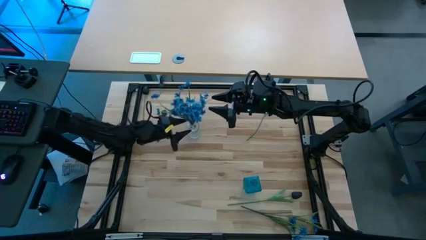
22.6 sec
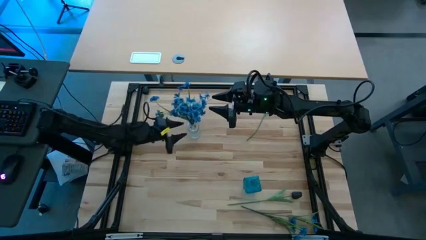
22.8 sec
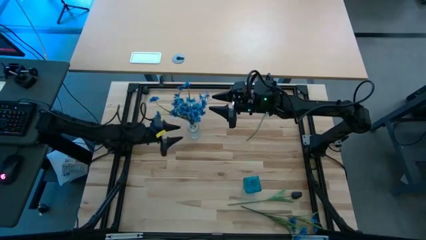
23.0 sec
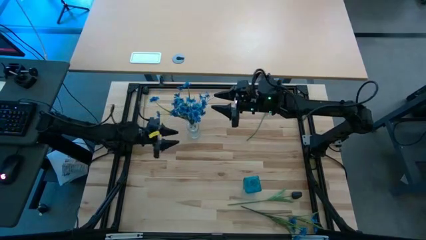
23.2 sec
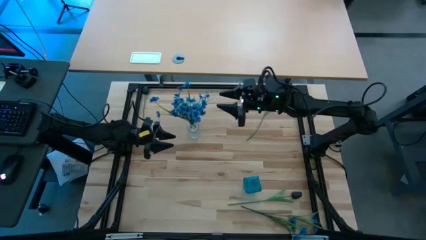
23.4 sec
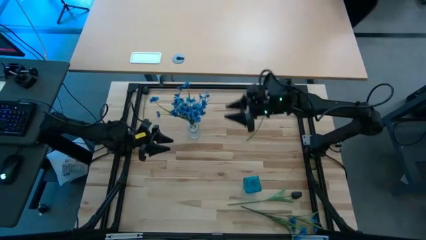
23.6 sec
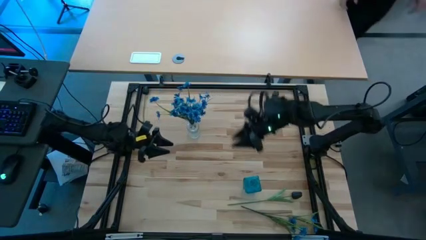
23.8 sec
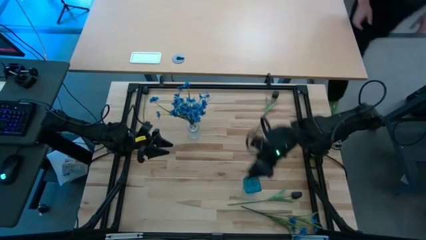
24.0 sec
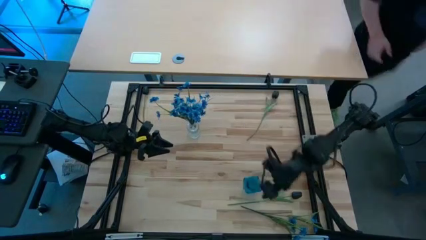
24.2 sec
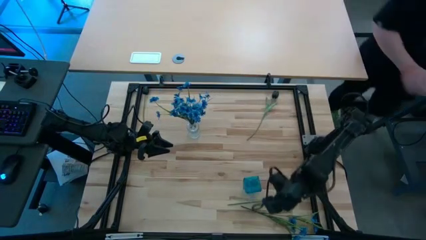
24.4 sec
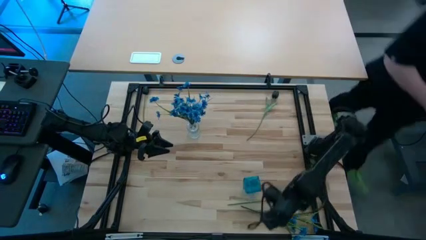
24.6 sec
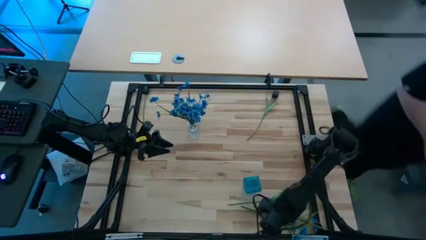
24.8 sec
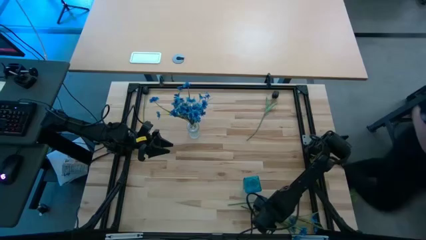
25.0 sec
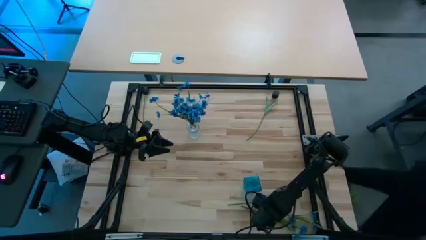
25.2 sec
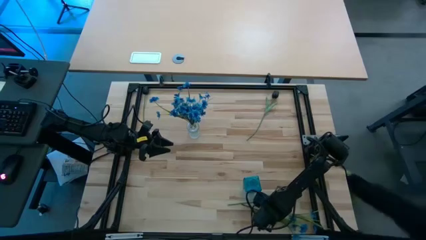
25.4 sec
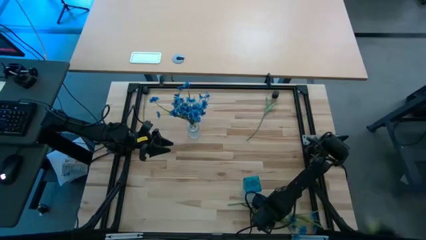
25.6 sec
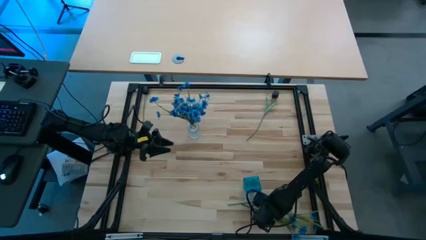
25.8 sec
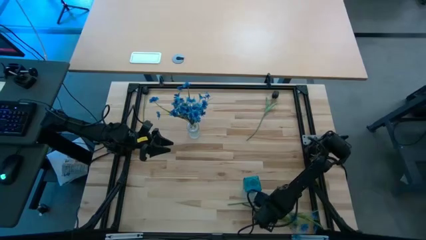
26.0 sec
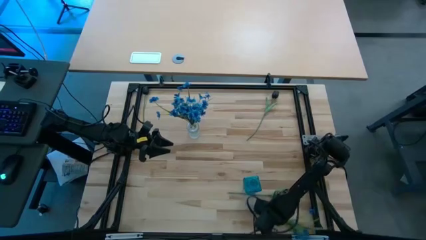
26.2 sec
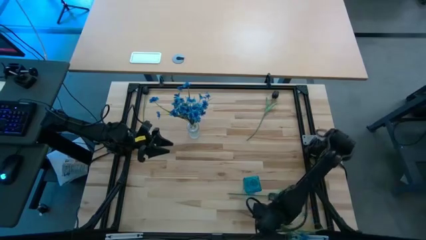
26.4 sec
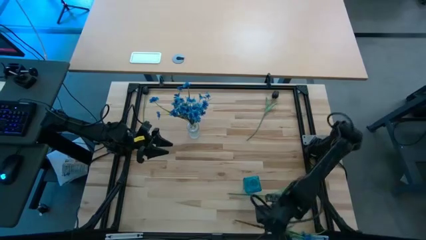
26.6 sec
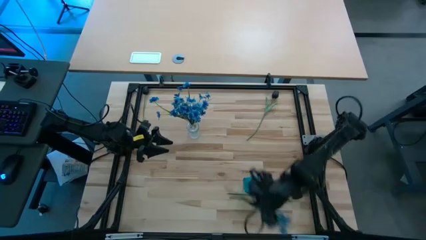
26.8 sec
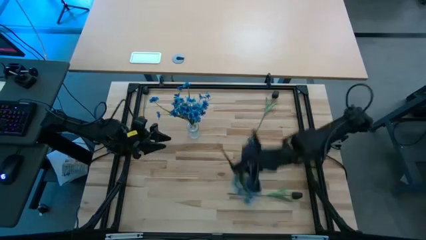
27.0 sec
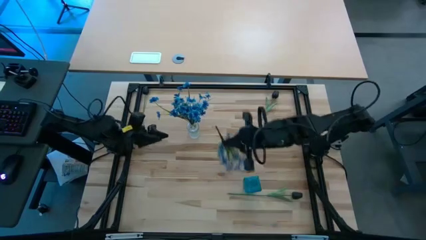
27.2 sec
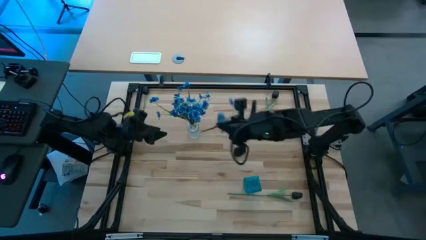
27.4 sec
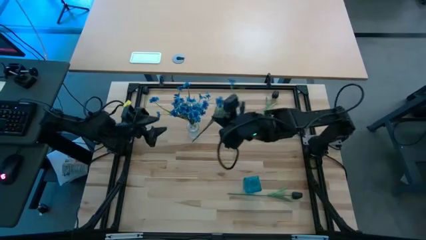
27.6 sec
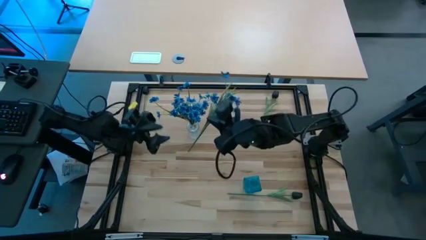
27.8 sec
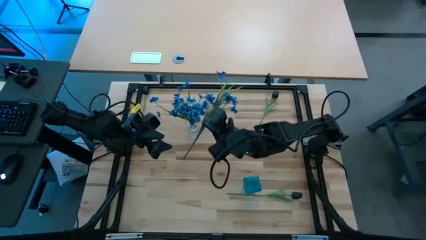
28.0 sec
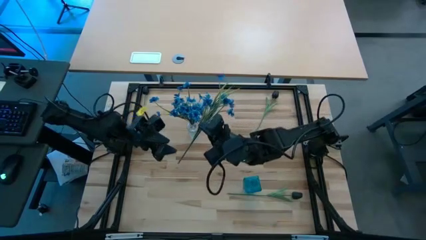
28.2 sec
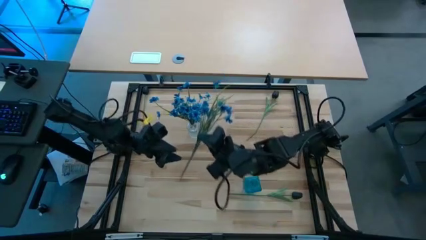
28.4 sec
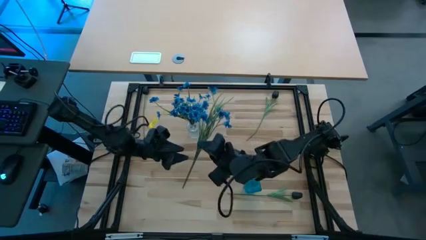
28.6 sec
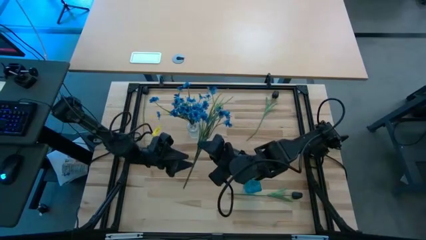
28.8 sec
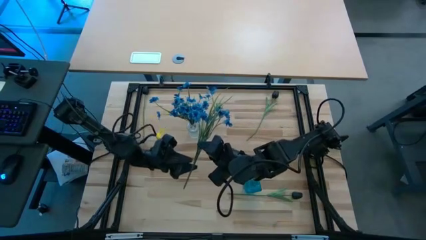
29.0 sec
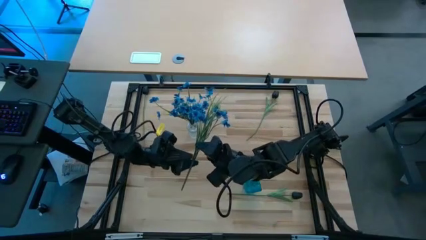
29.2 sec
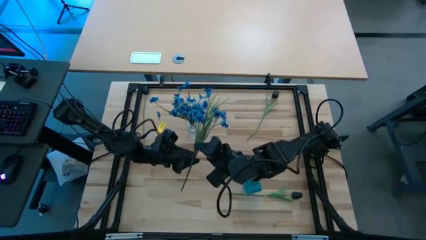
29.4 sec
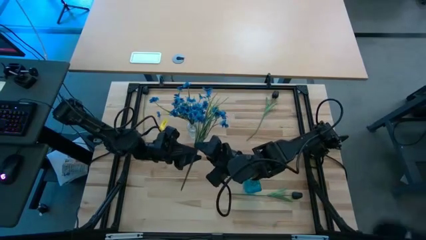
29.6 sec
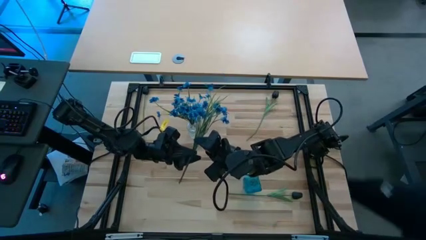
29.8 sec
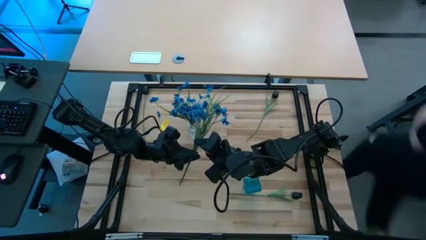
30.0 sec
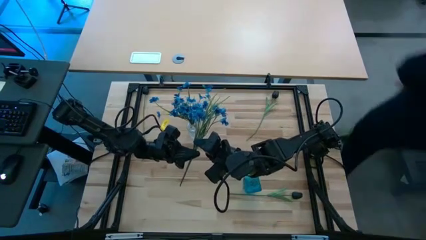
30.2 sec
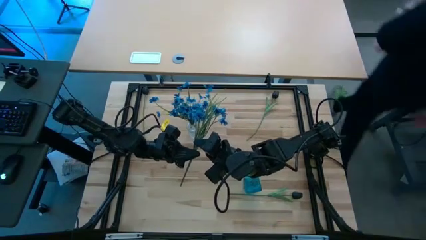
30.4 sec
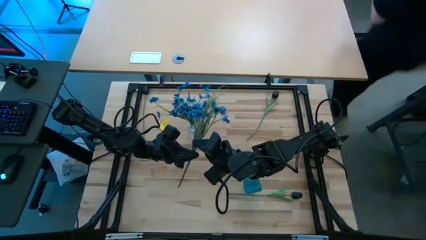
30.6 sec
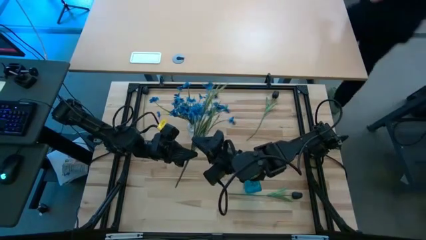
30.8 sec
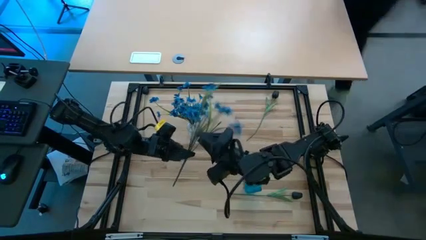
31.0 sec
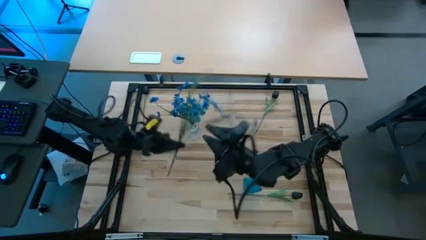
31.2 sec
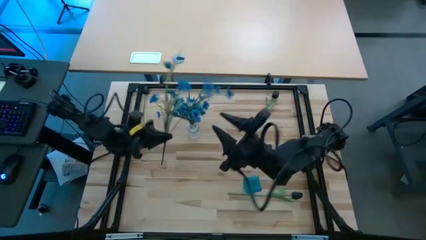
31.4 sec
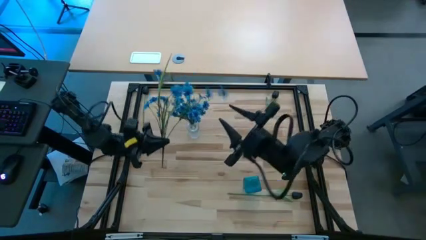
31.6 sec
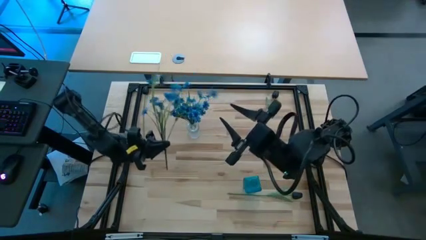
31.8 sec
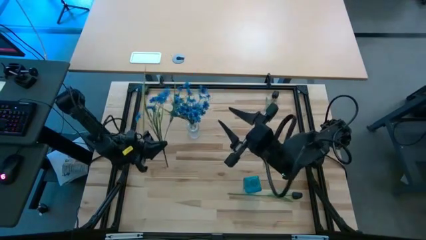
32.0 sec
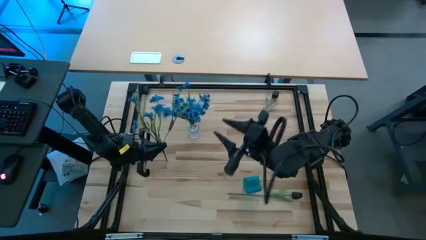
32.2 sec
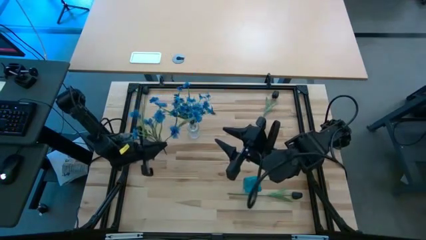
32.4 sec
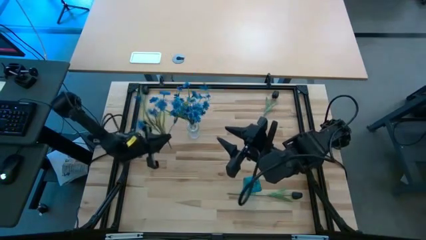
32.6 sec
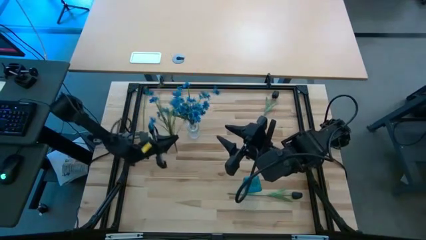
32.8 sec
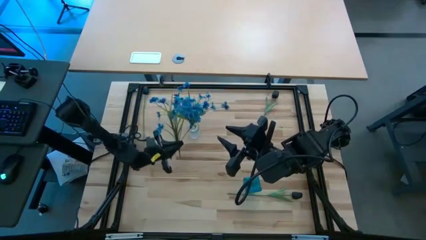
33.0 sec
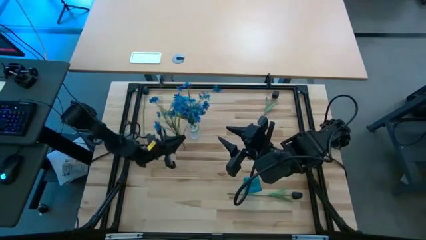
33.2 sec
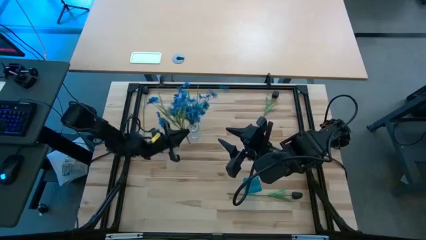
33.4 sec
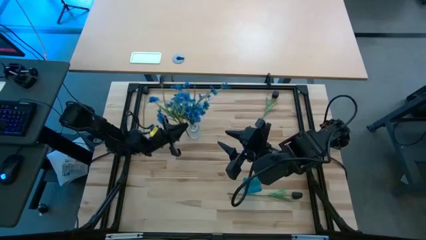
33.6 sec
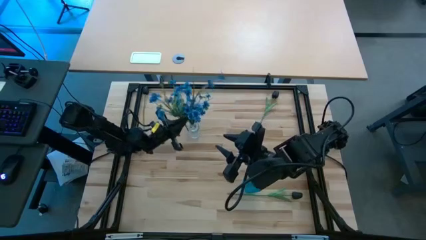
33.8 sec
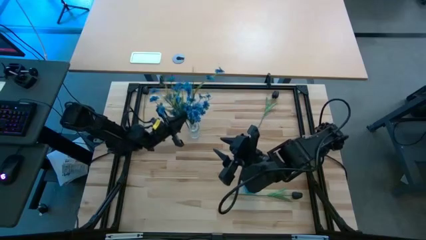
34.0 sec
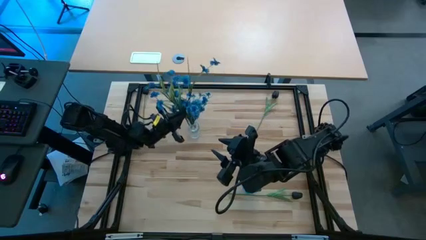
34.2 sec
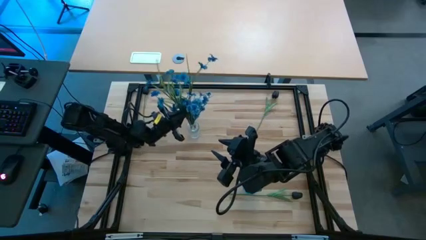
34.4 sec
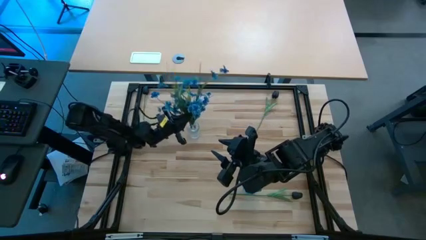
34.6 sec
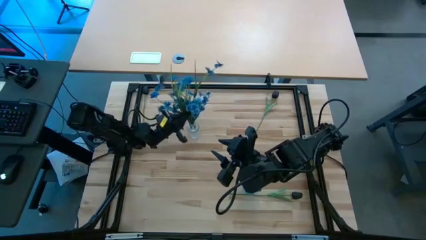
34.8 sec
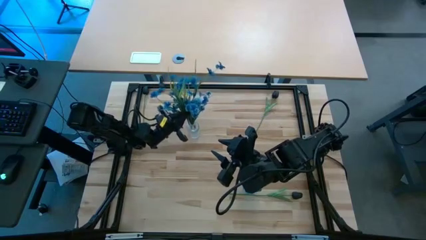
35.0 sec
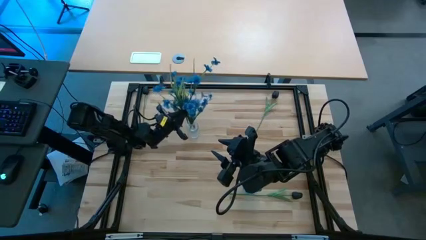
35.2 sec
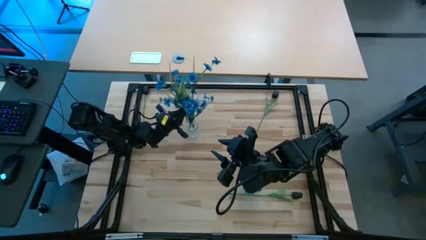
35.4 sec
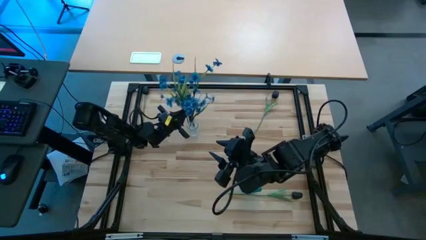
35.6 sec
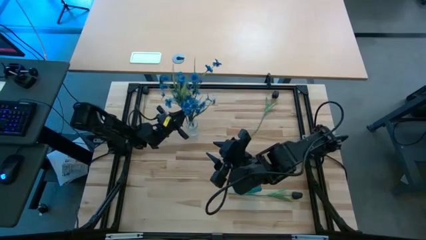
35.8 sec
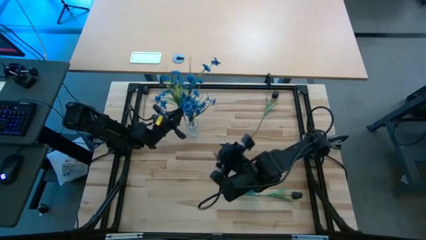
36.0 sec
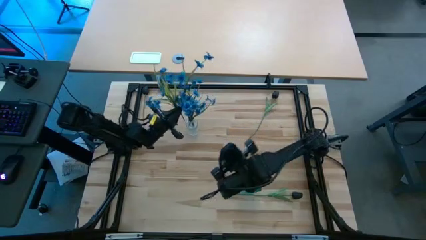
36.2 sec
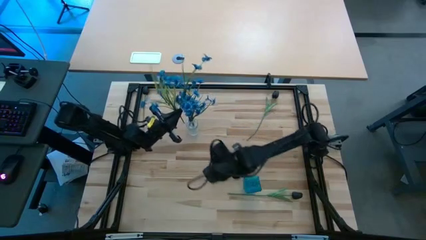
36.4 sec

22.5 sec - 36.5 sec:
Task: Sort flowers into vase by color
Put the light blue flowers into the transparent vase
